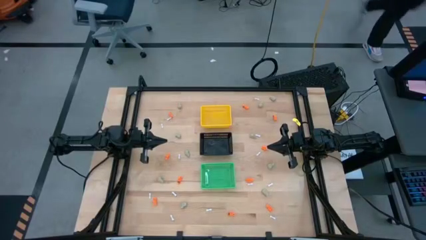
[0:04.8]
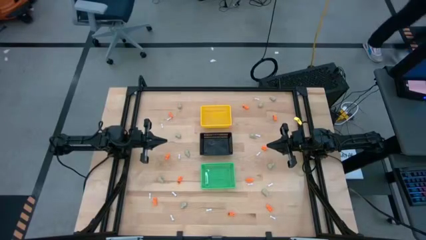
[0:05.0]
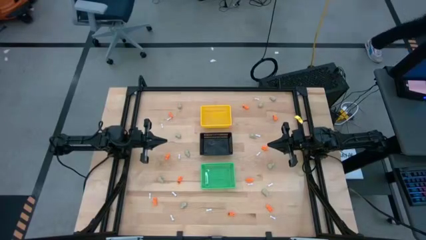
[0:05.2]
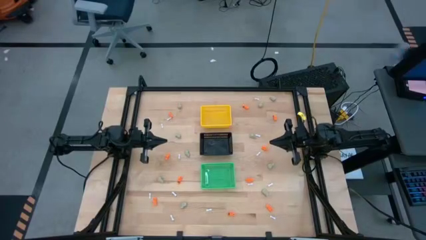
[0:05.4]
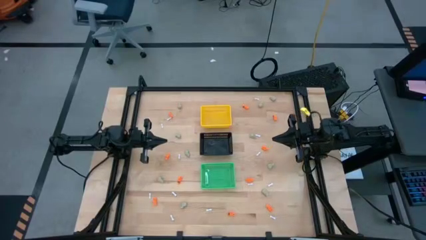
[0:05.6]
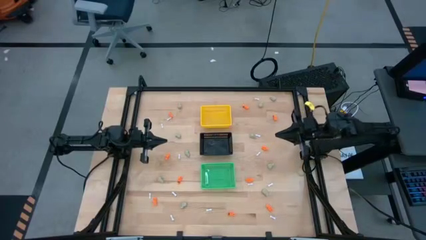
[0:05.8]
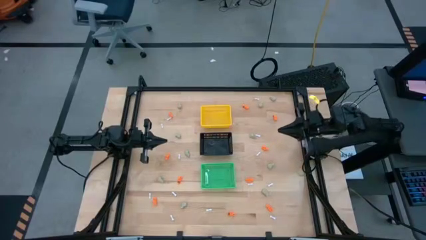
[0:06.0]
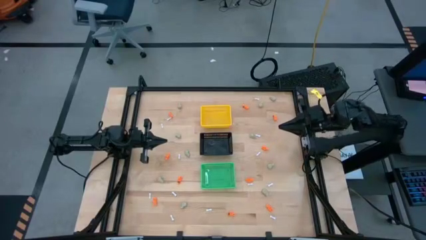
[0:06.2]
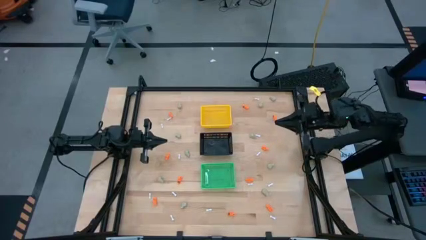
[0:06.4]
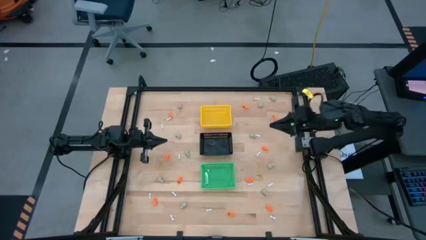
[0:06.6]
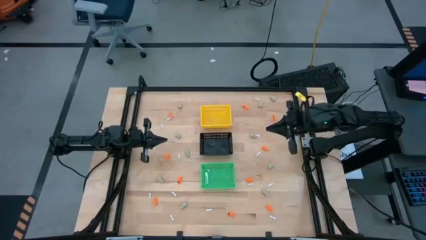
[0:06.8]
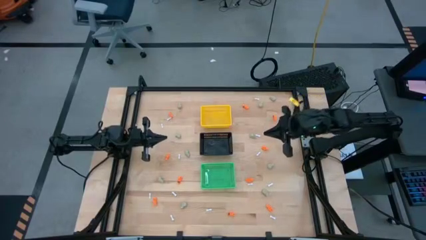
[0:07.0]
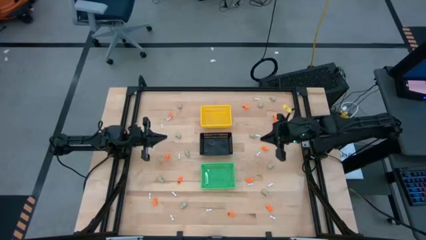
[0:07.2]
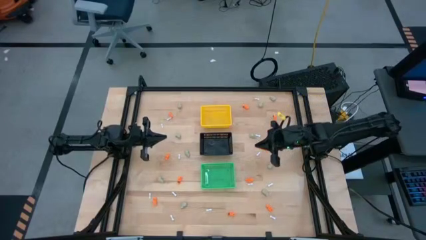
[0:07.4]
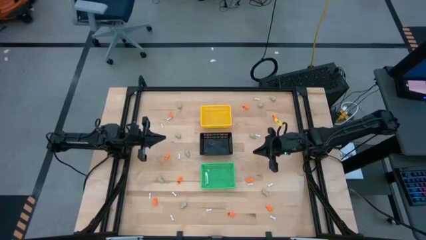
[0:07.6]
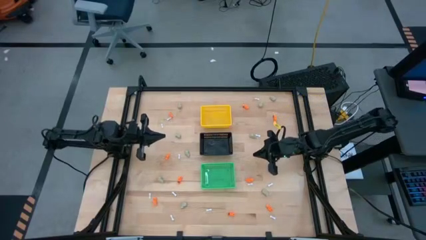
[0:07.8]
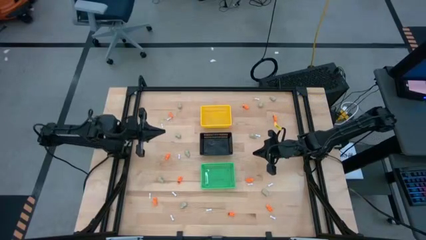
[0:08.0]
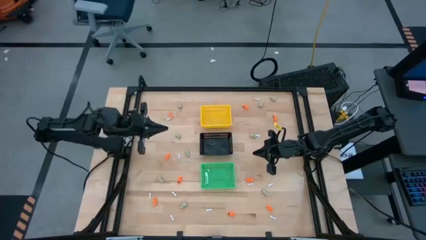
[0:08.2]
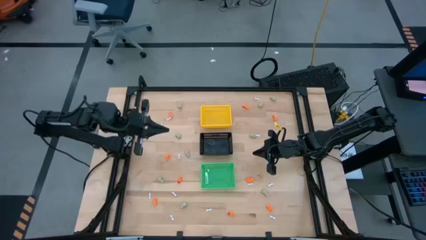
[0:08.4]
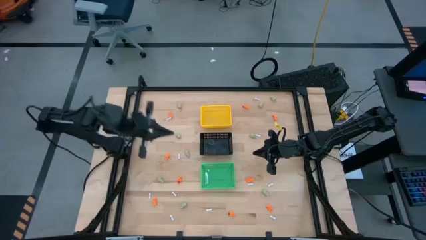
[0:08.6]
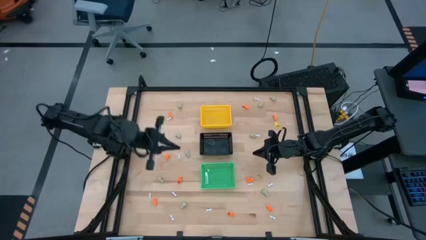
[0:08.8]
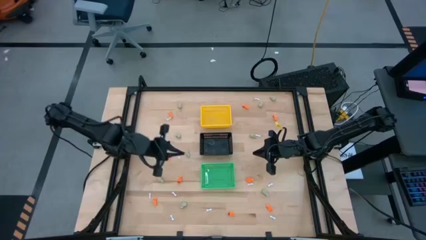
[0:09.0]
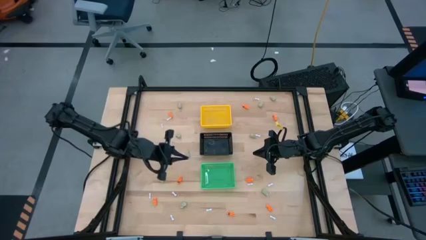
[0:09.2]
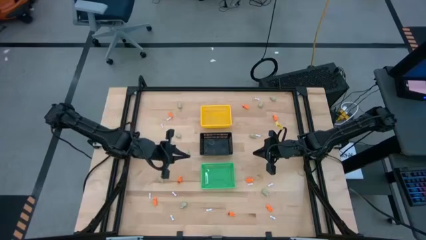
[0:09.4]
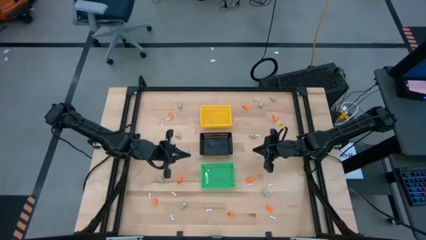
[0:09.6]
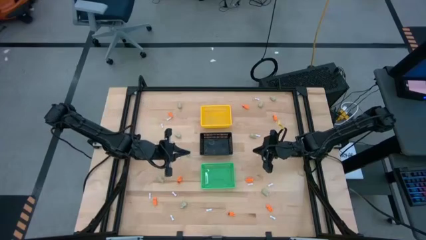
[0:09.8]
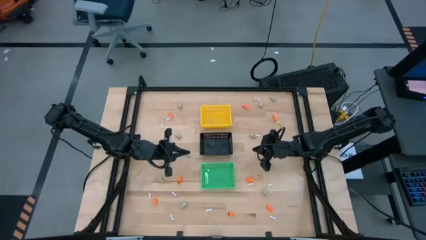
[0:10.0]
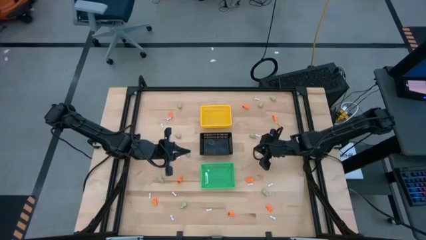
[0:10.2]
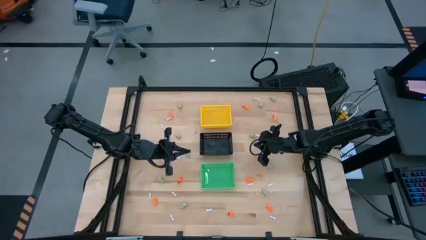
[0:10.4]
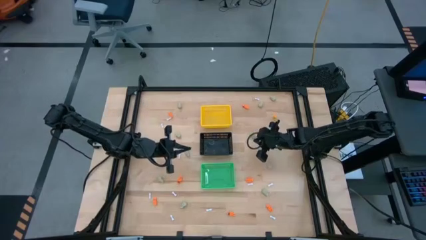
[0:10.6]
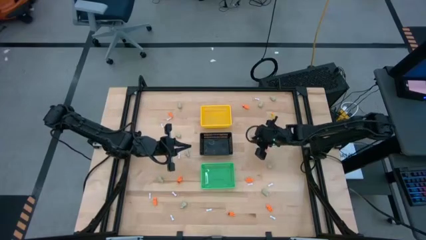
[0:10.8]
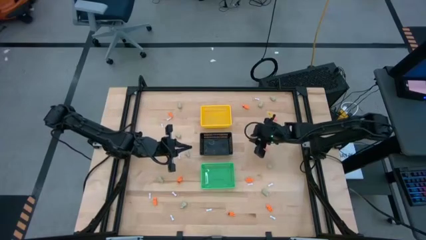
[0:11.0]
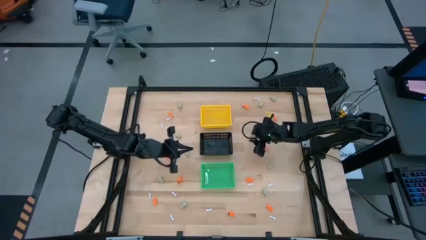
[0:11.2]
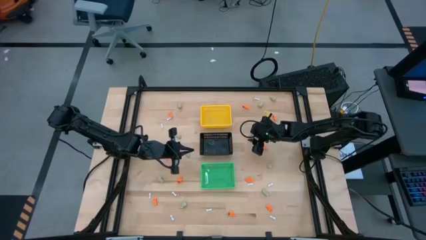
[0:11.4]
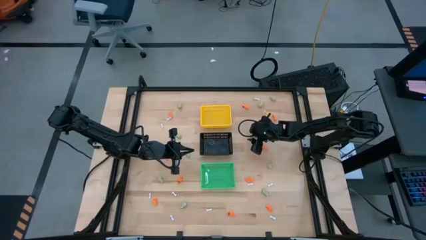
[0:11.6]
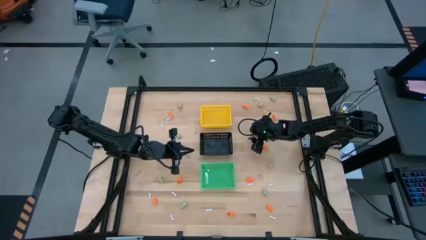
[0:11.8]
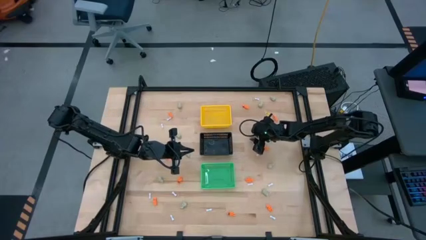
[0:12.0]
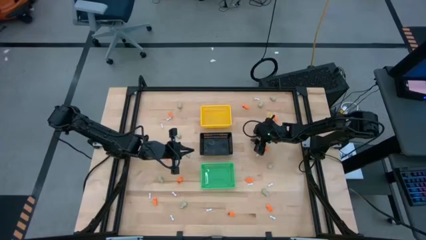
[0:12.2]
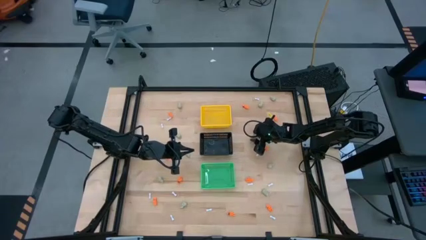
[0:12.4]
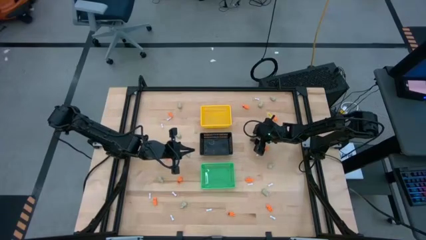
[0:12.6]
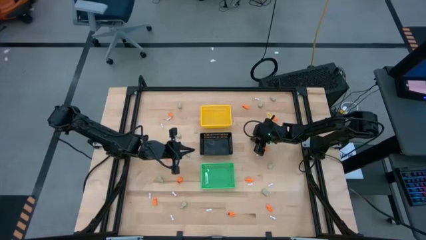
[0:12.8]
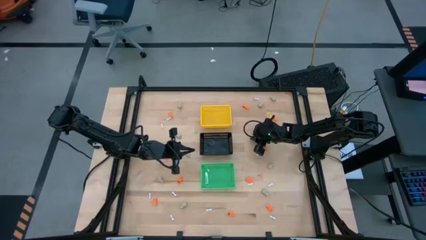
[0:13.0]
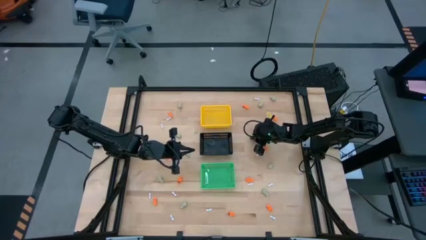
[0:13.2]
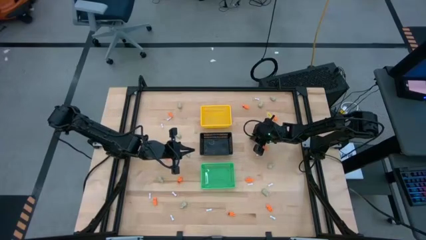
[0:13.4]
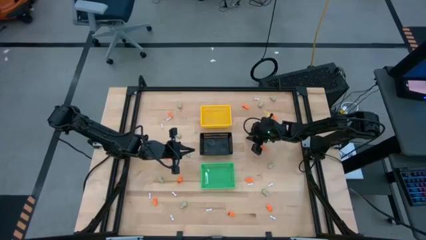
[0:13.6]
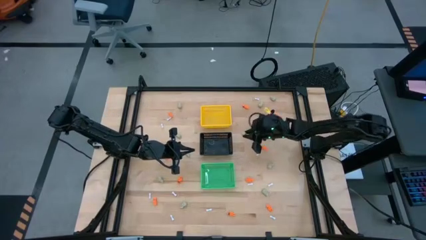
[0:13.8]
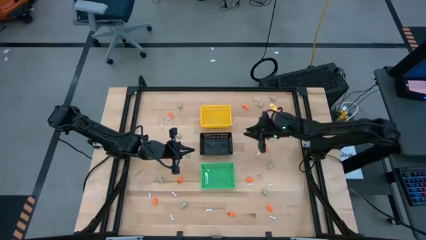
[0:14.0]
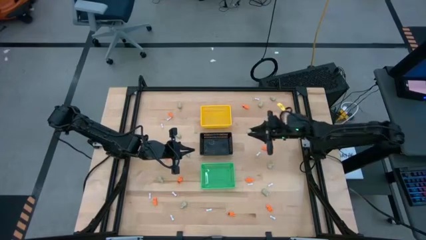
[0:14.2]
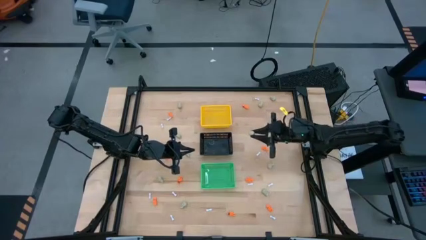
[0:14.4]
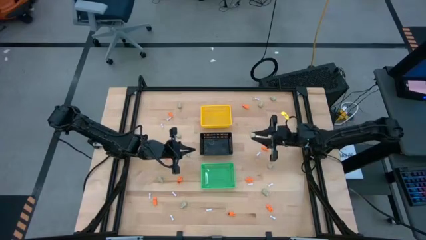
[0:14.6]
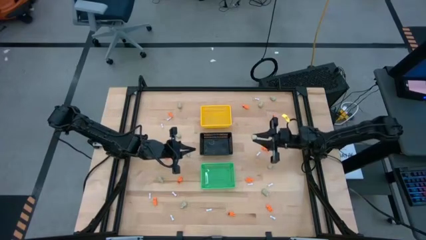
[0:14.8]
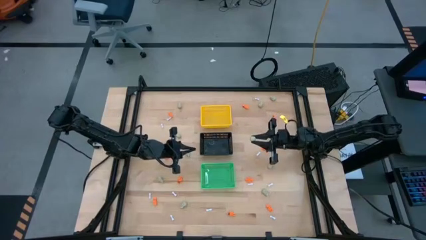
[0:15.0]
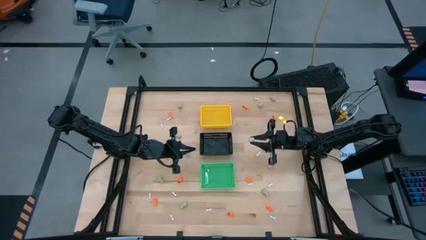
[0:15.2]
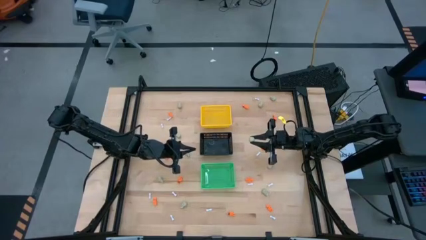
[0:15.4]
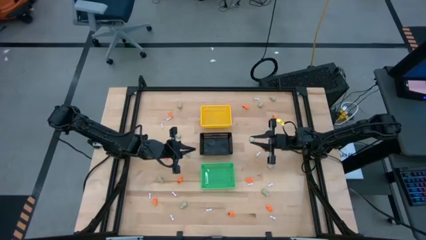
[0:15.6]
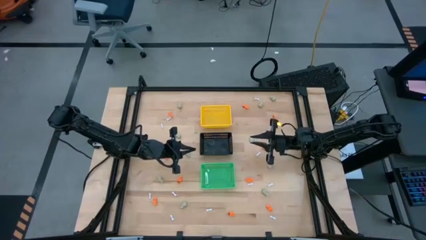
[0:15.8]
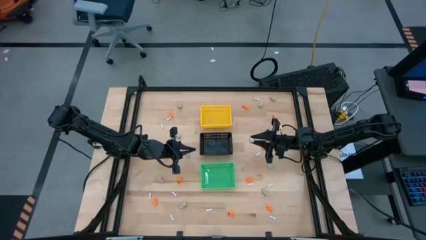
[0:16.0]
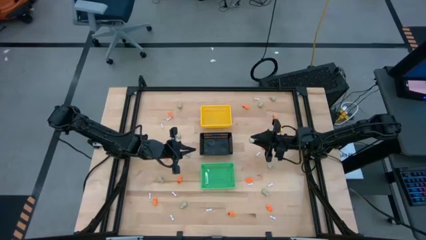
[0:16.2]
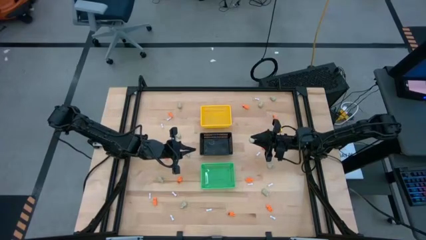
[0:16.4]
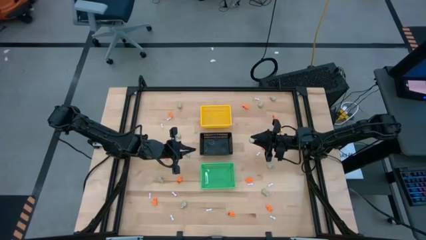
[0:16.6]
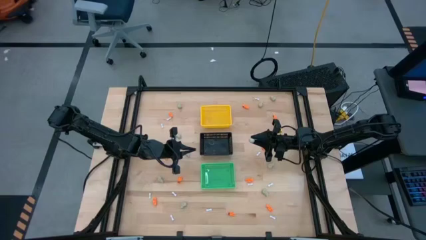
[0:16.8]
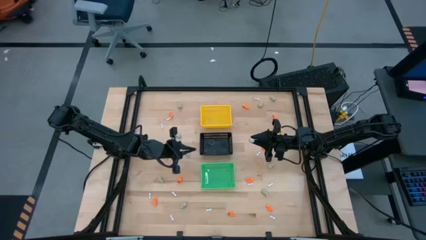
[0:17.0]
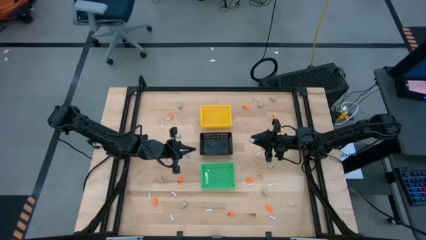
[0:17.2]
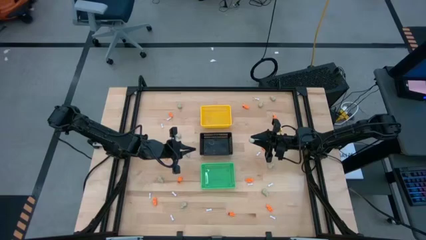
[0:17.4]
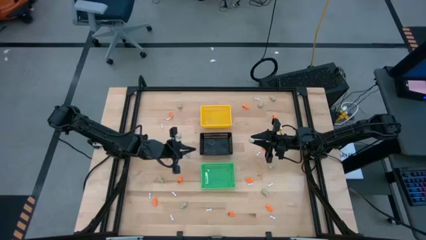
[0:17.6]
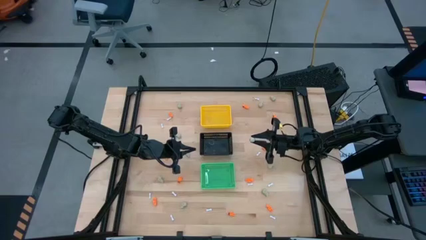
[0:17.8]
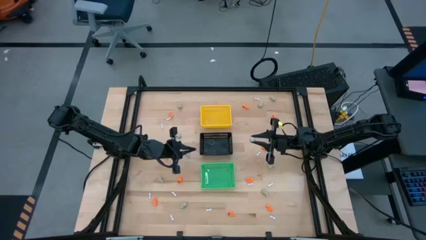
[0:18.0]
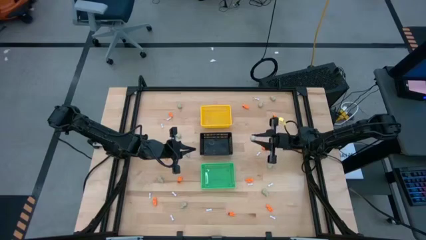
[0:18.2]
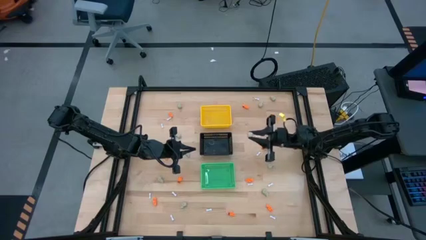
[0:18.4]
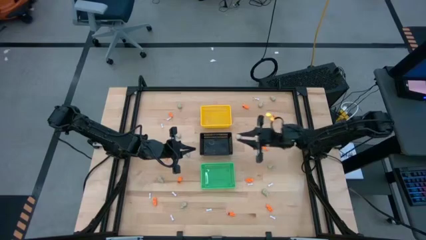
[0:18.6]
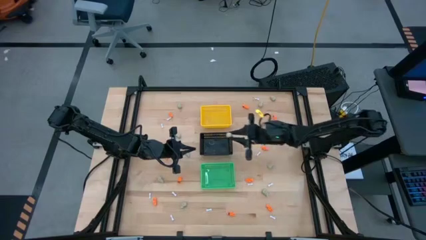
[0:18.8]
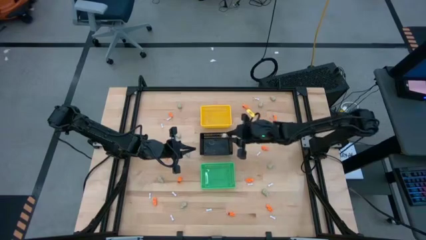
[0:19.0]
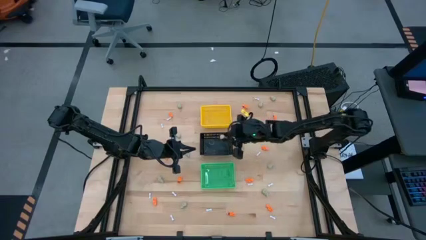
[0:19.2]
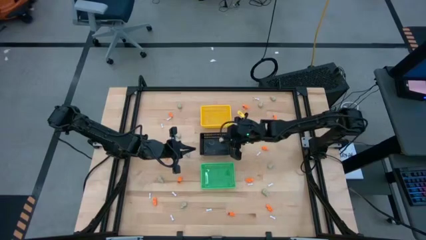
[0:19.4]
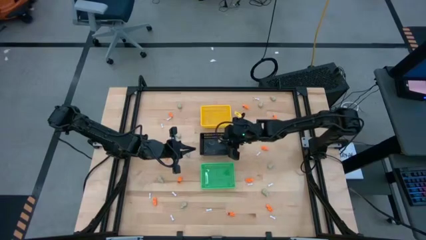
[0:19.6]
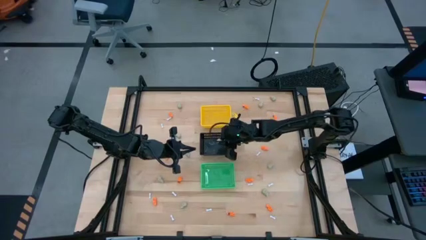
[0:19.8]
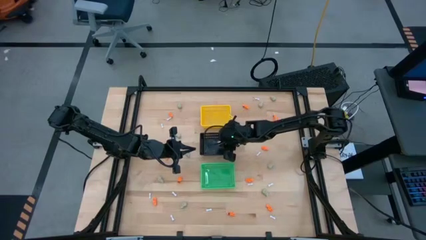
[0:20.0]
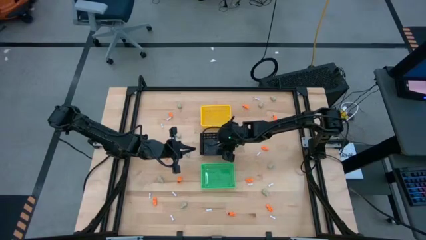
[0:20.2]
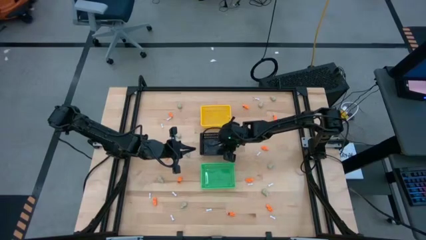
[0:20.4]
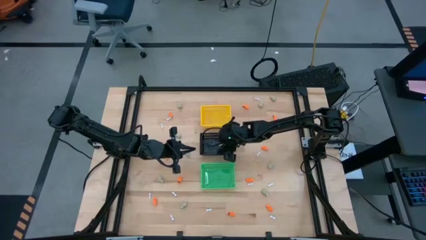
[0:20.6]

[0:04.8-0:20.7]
Task: Sort Halloween decoration
Put the gray skull toy into the black basket
